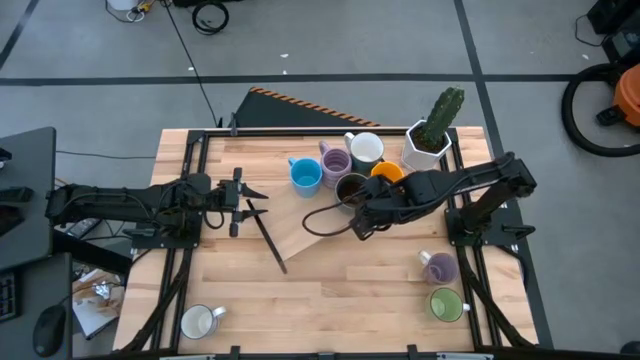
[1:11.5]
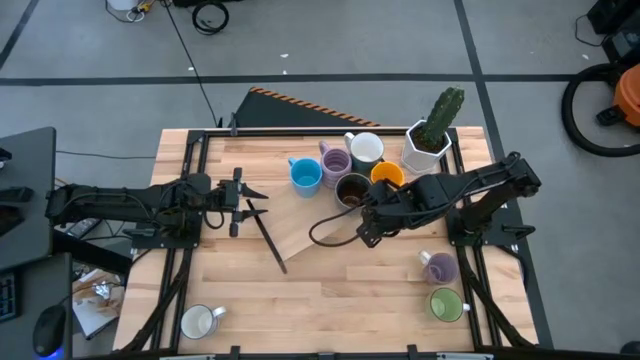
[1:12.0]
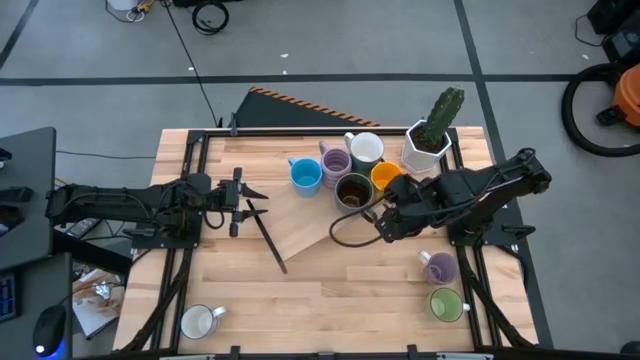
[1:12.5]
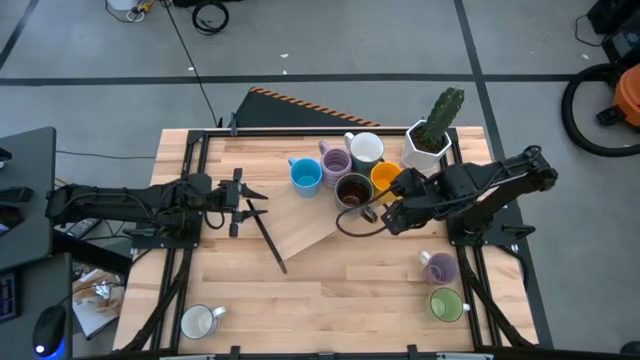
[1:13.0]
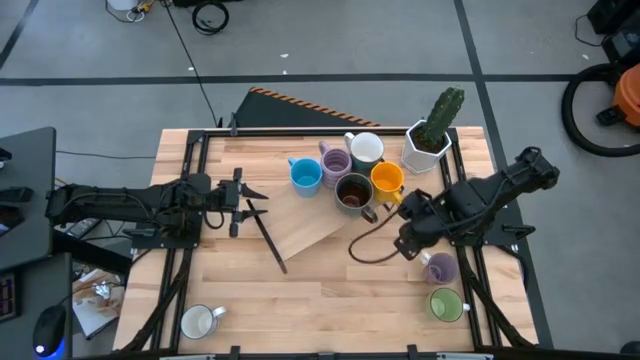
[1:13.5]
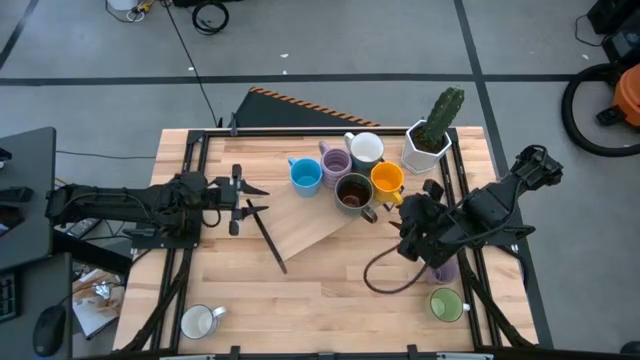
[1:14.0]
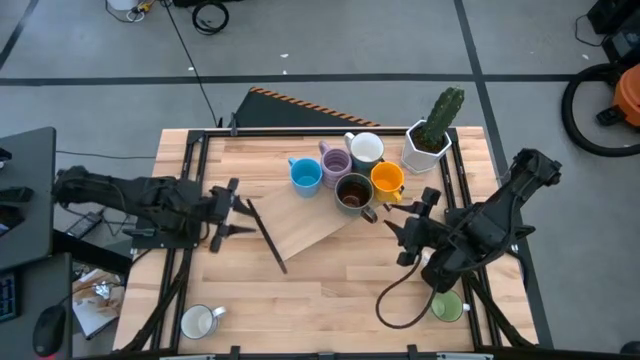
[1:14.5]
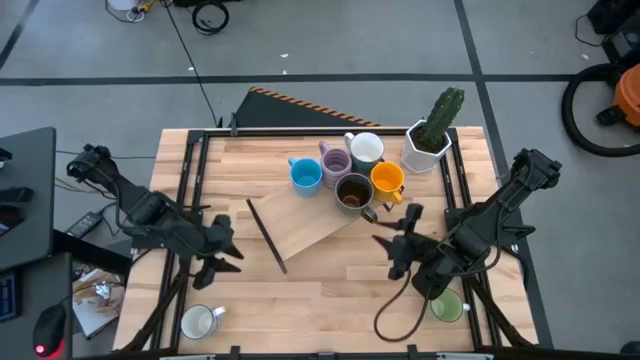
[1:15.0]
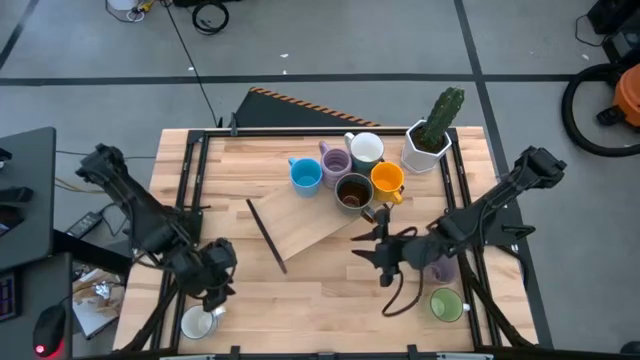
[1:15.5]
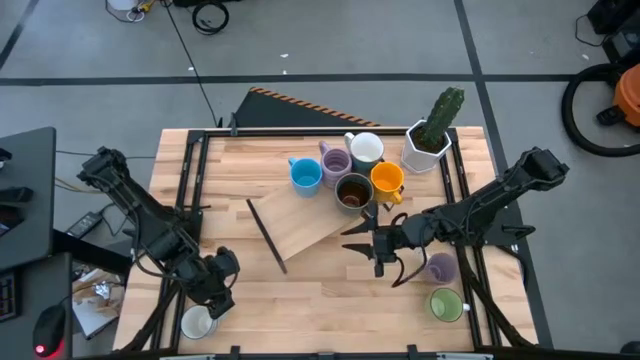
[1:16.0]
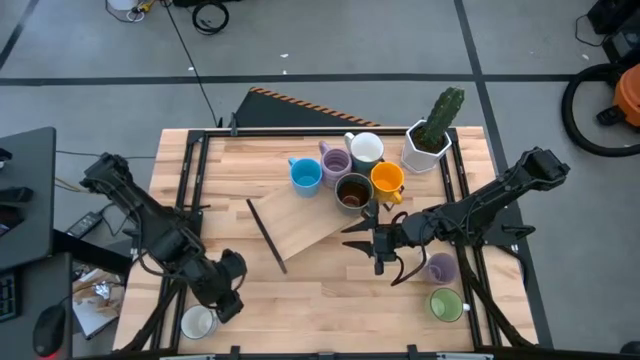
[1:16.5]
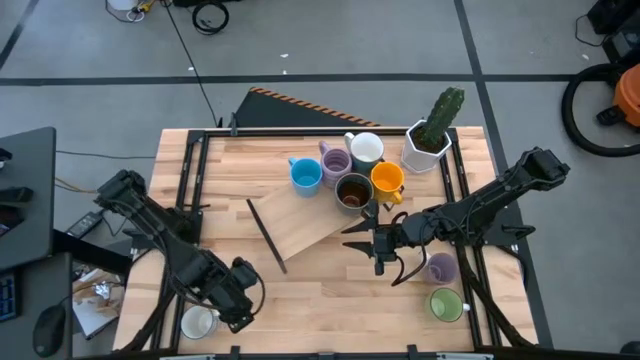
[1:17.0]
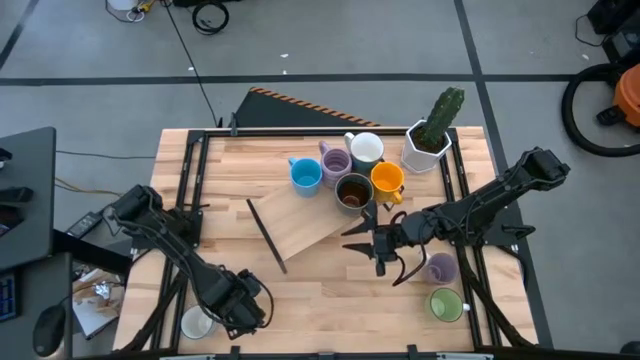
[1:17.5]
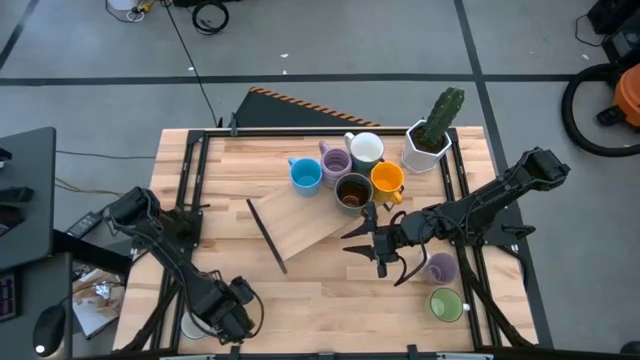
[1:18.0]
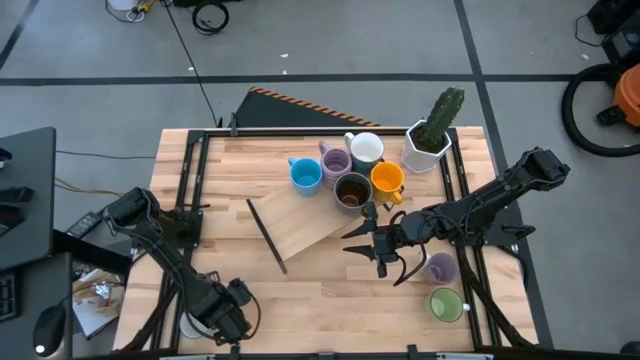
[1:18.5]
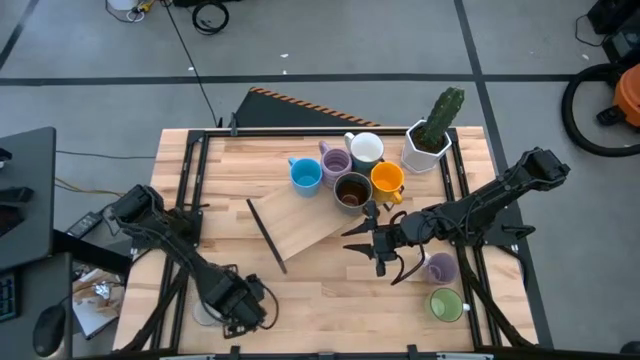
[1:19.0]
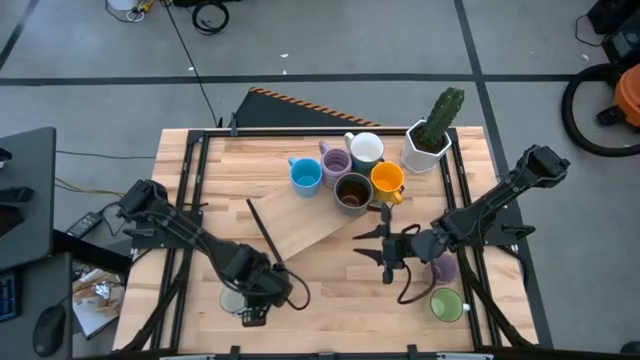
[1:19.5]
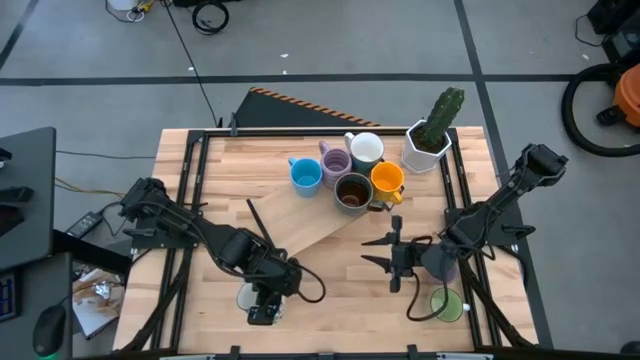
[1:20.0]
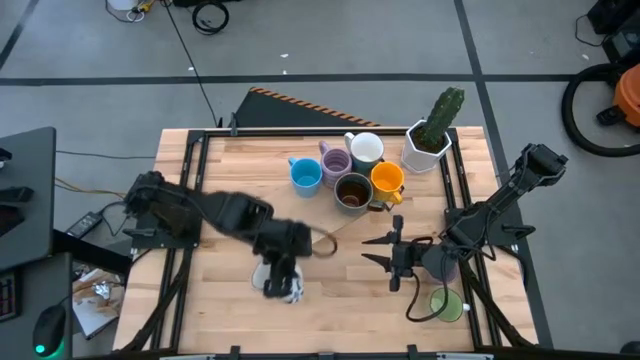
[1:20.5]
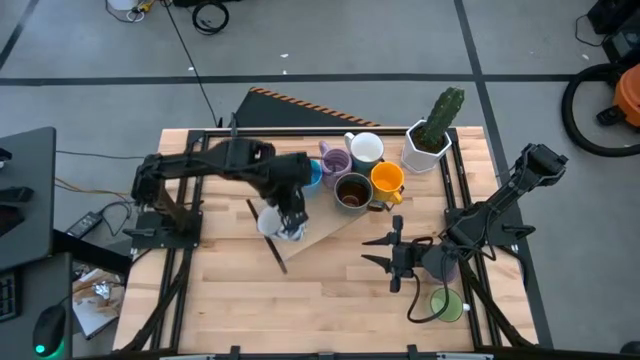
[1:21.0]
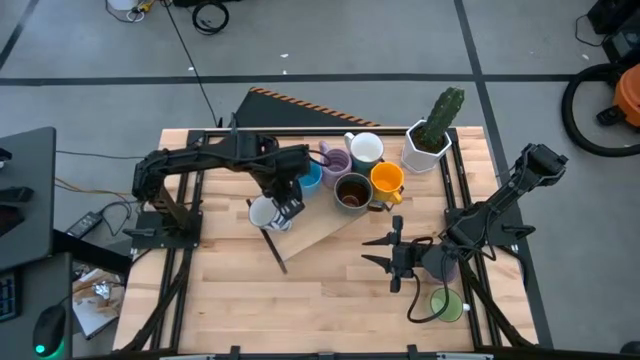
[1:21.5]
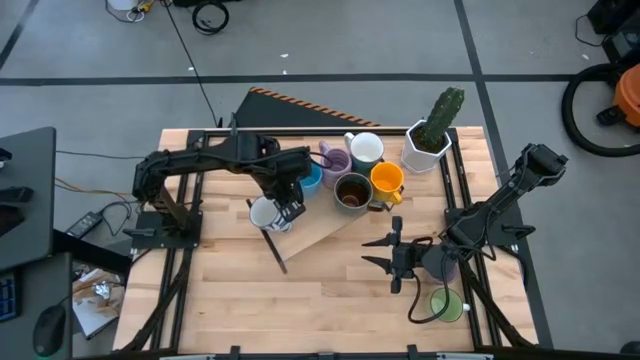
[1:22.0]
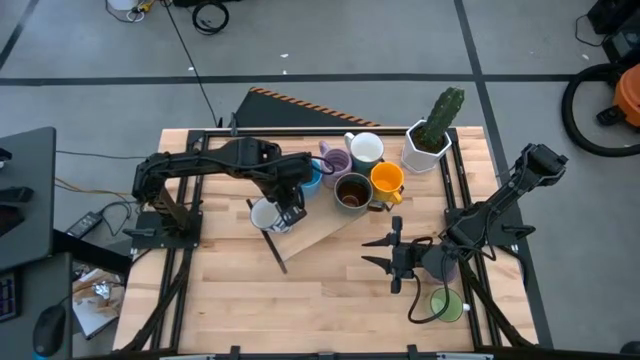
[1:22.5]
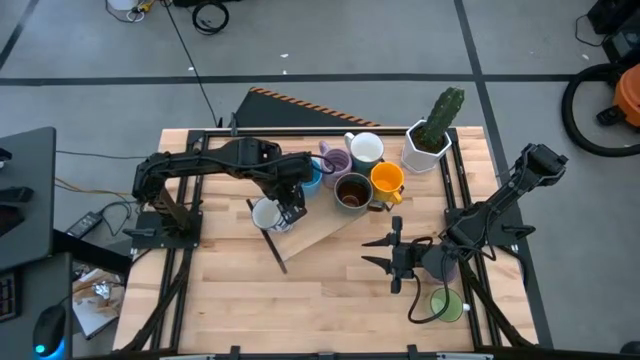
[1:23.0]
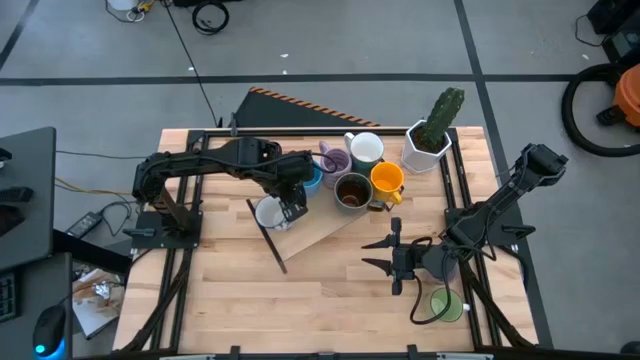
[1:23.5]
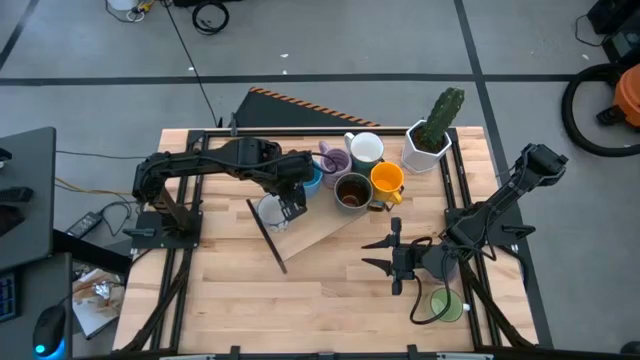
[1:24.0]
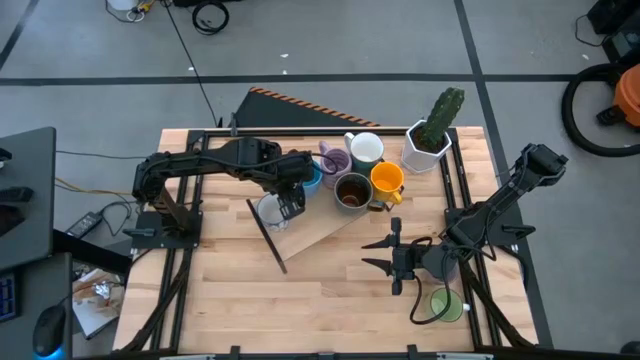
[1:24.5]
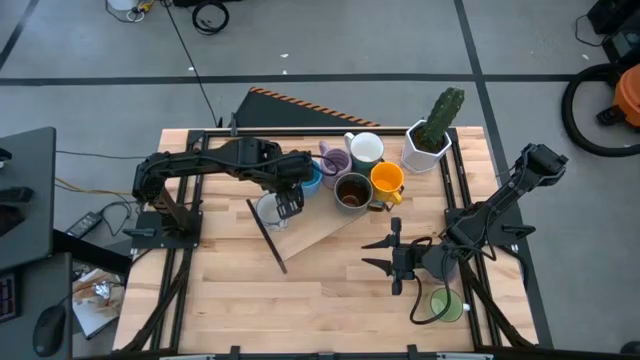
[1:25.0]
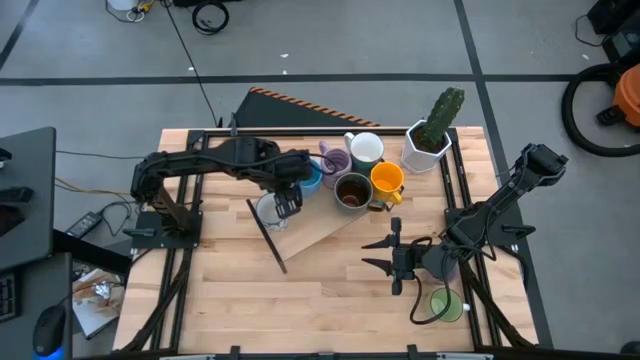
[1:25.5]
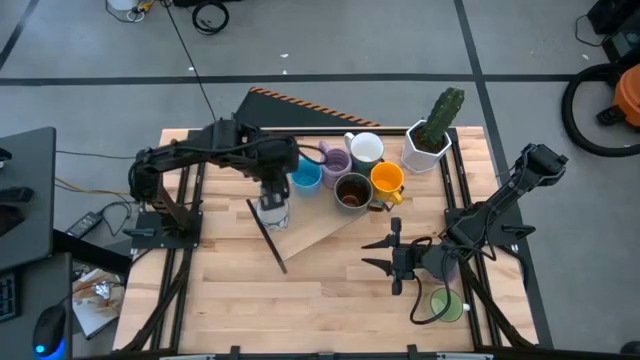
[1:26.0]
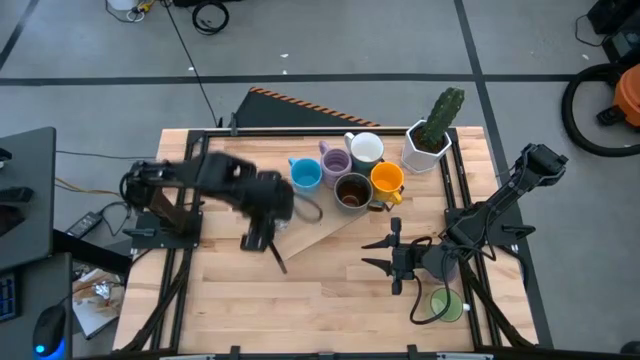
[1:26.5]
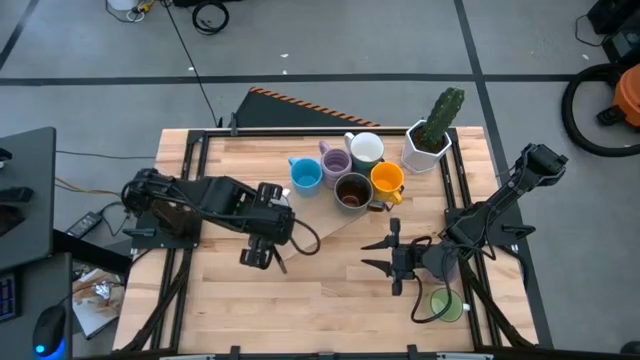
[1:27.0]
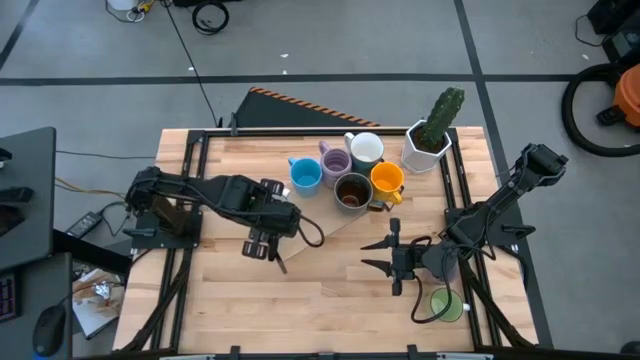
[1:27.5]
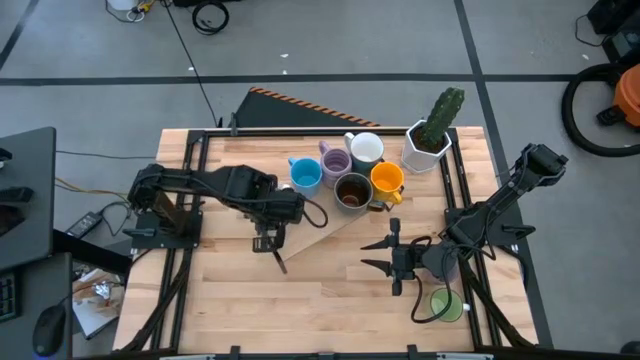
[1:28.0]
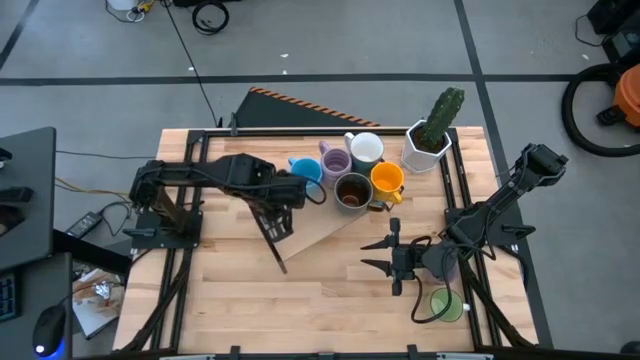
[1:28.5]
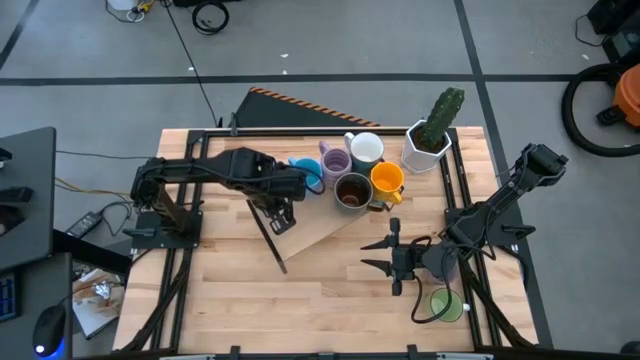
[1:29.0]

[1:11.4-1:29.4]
Task: Place coffee mugs
Put the white patterned mug on the shelf

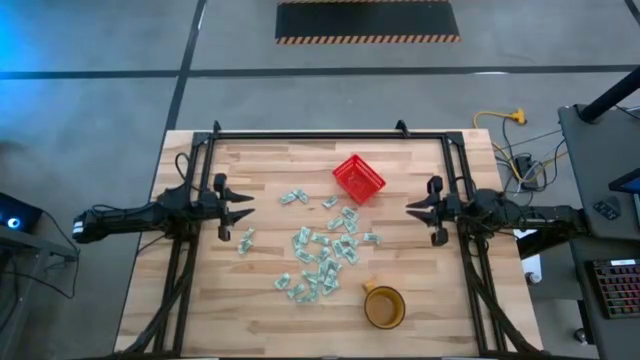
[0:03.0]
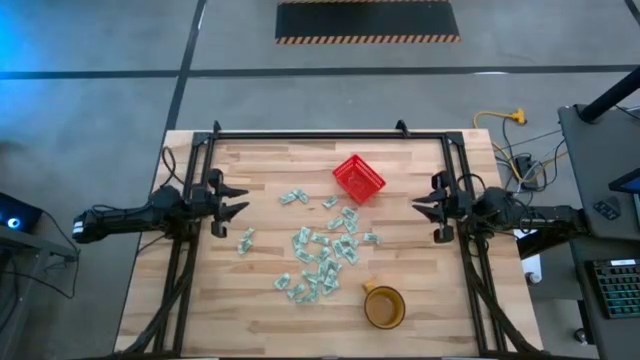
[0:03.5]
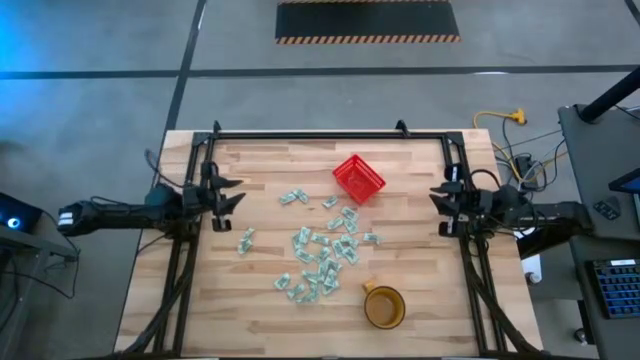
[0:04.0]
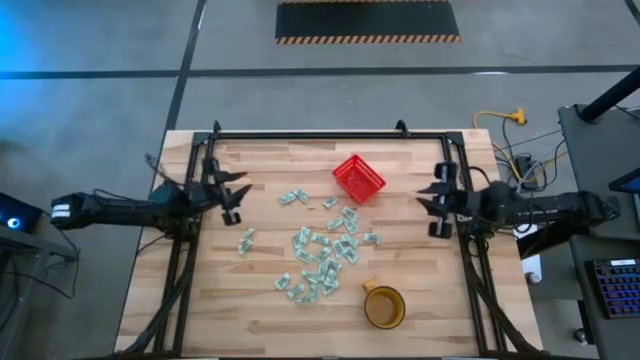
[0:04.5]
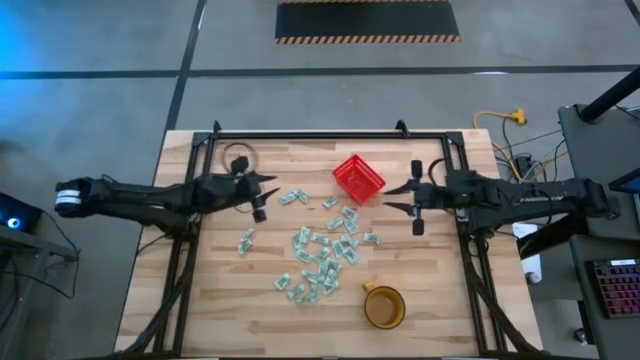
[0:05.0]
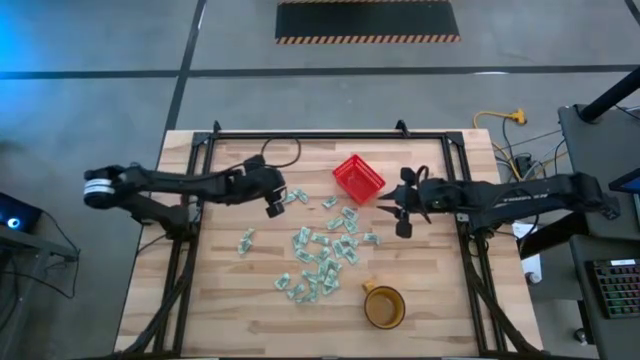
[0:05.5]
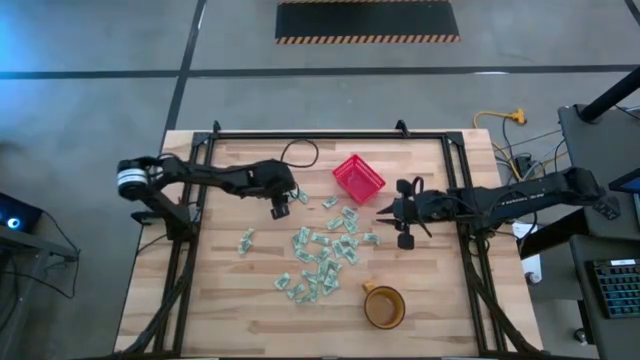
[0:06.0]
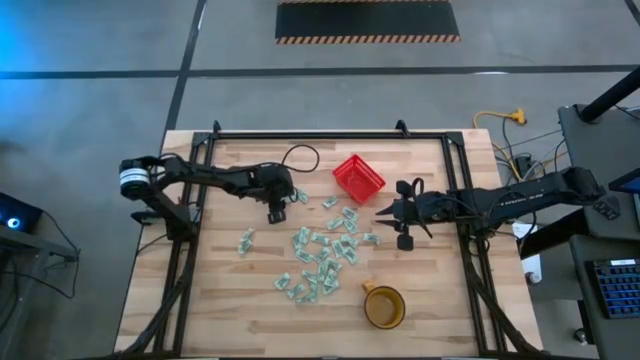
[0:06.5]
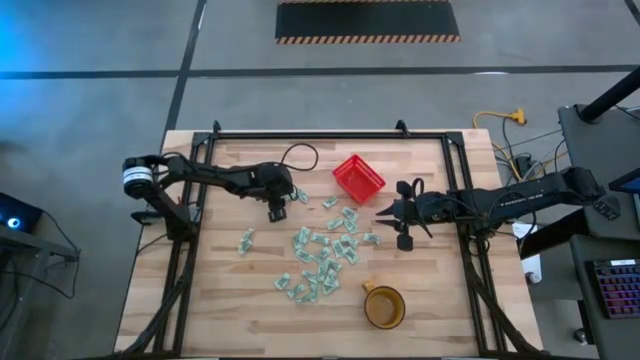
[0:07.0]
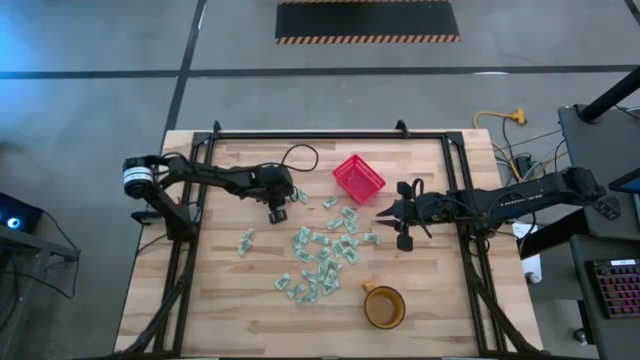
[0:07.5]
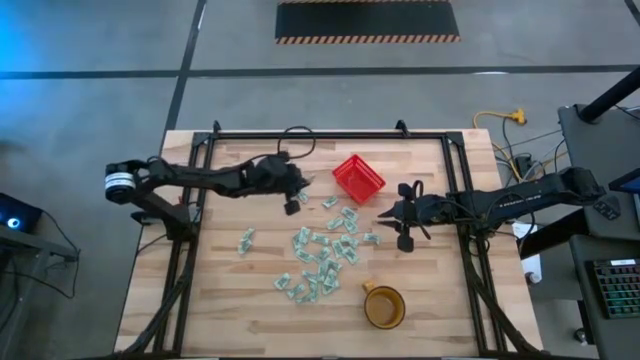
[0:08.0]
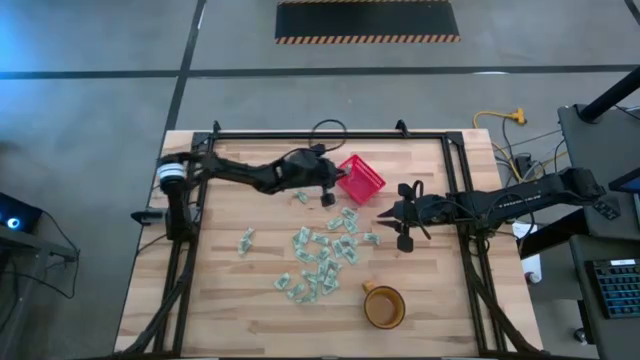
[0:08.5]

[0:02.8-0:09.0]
Task: Pick and place Stevia / Truvia into bins
Put the stevia packet into the red basket
